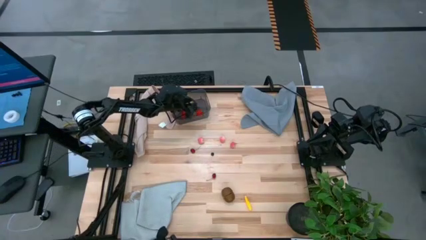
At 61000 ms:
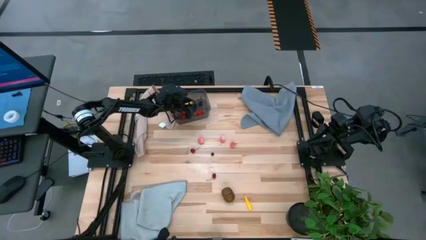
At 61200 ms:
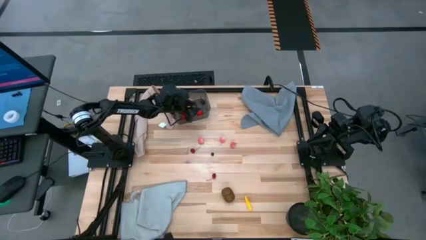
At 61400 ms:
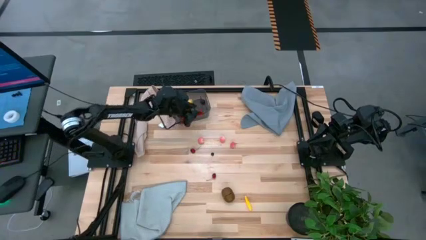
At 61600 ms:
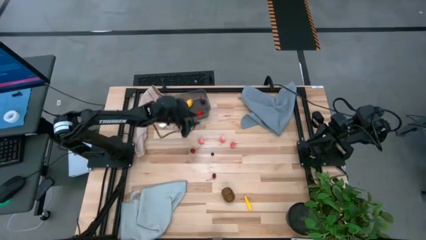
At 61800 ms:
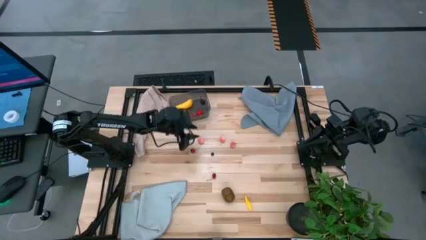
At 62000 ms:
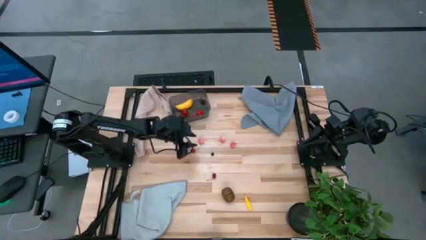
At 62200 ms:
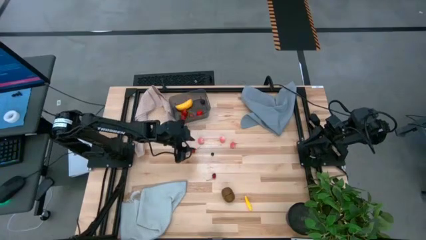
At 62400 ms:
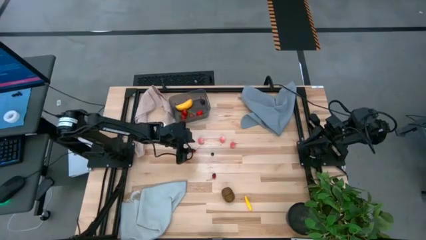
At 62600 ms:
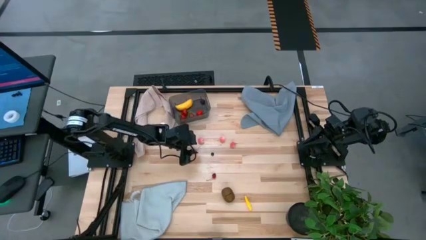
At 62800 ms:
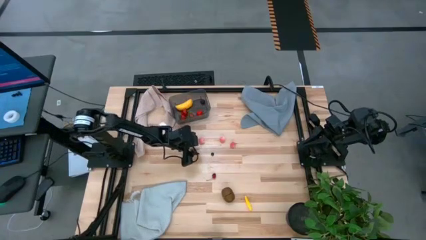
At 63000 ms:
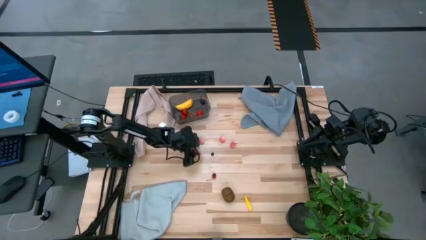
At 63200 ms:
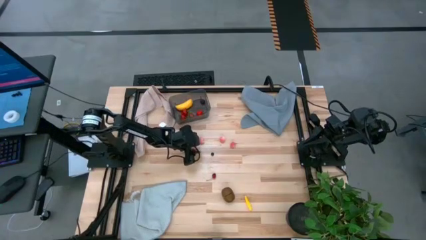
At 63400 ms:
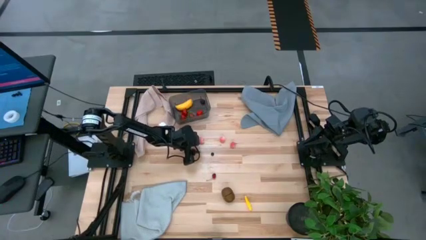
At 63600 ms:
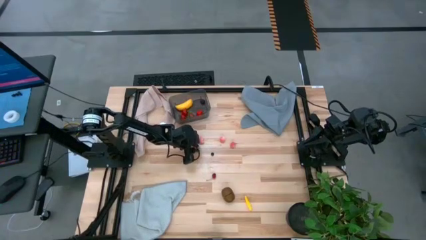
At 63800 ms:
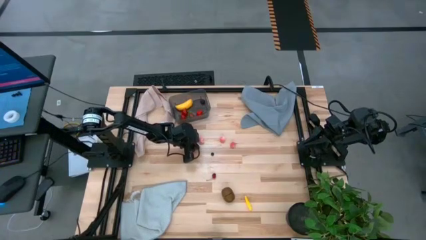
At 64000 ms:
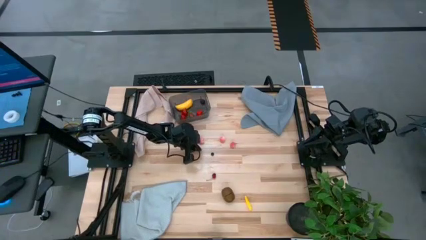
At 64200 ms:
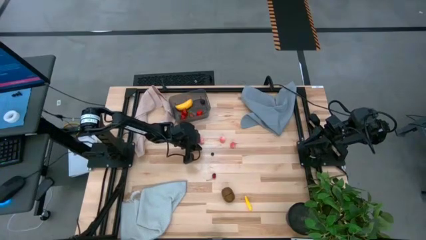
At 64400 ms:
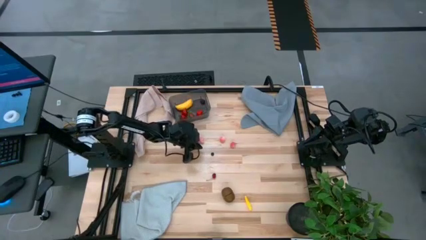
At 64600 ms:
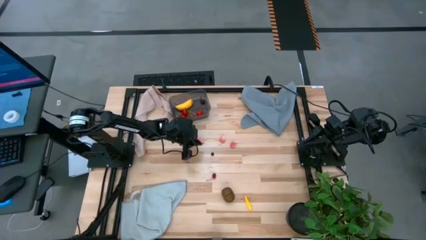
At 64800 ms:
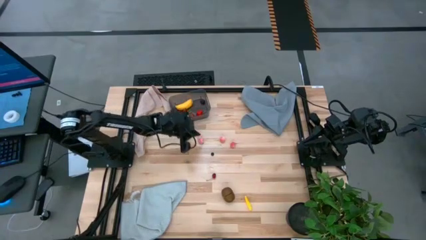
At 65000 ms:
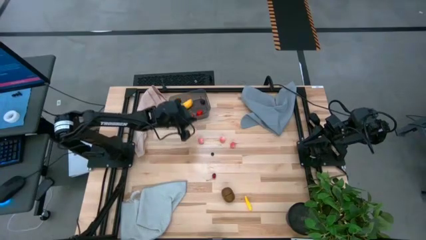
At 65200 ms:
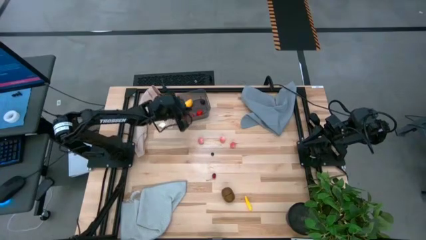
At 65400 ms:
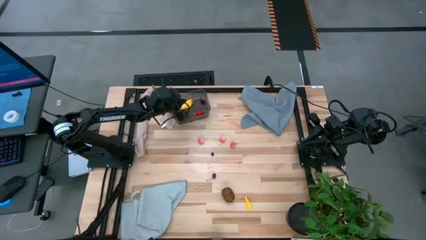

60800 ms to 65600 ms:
Task: Pick and placing Produce into tupperware
Put the red cherry into the black bin

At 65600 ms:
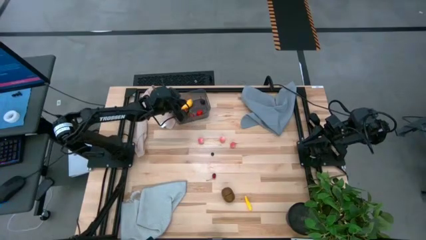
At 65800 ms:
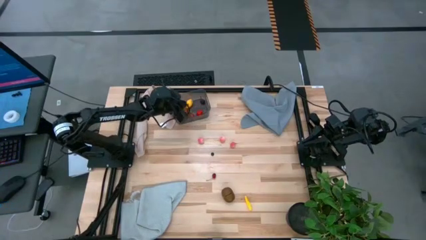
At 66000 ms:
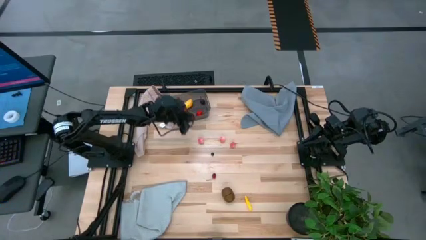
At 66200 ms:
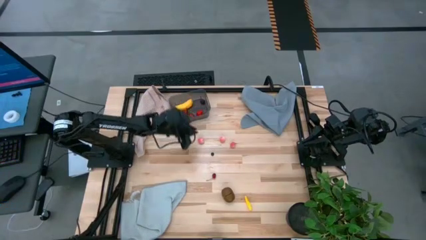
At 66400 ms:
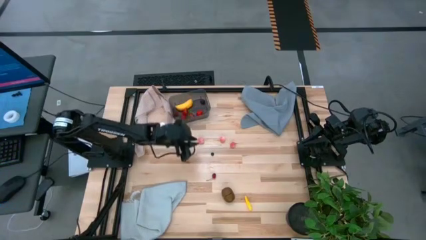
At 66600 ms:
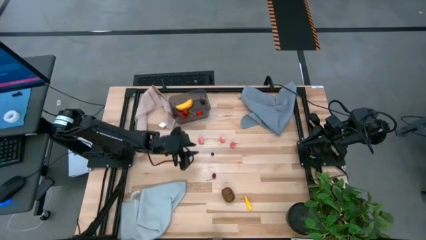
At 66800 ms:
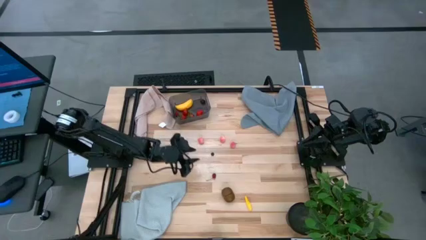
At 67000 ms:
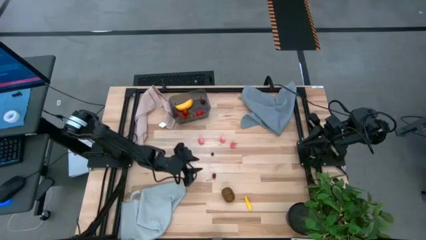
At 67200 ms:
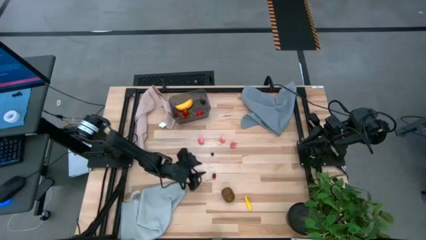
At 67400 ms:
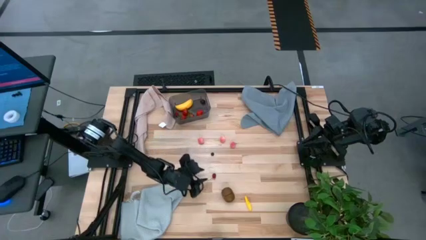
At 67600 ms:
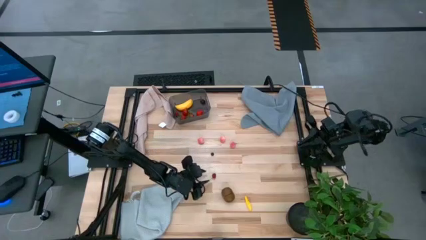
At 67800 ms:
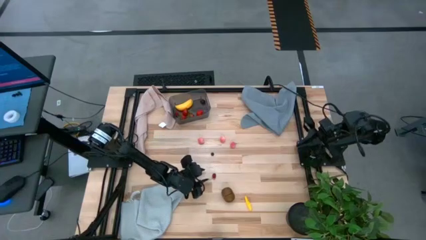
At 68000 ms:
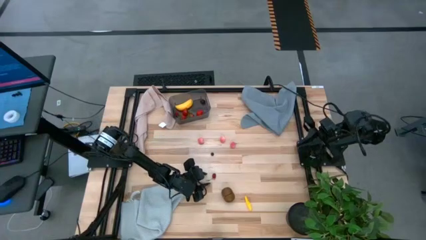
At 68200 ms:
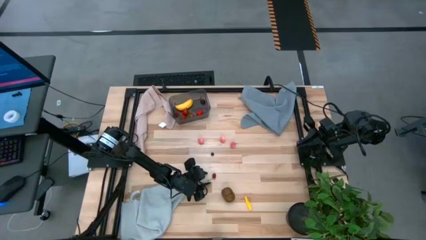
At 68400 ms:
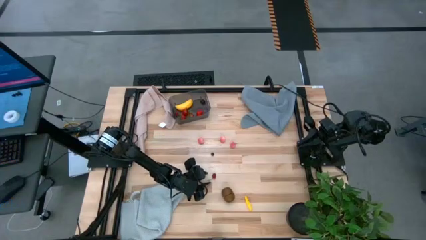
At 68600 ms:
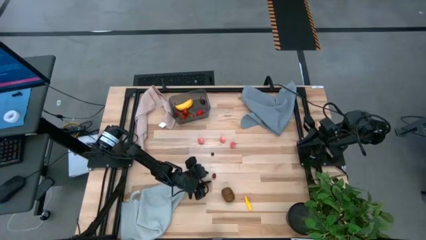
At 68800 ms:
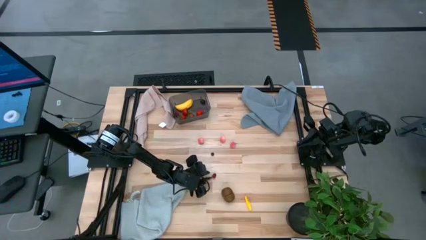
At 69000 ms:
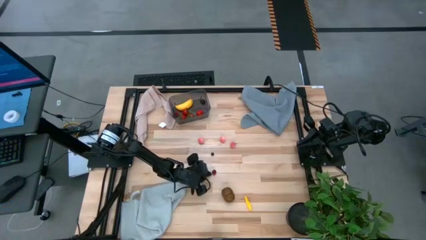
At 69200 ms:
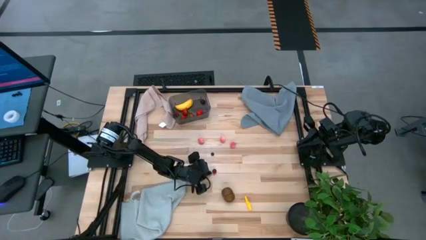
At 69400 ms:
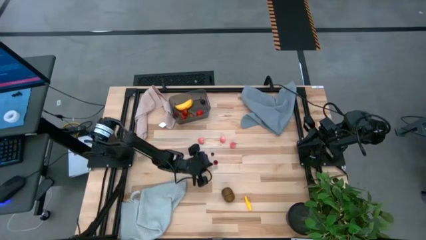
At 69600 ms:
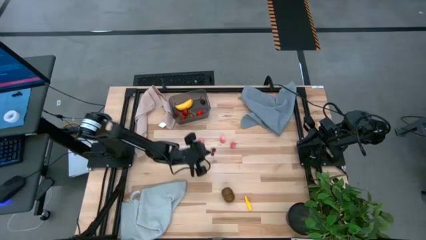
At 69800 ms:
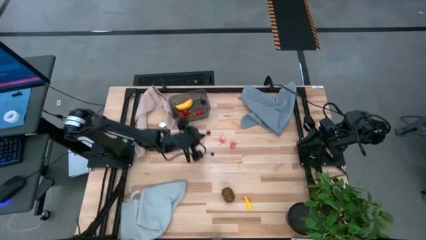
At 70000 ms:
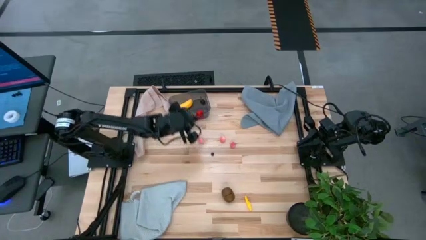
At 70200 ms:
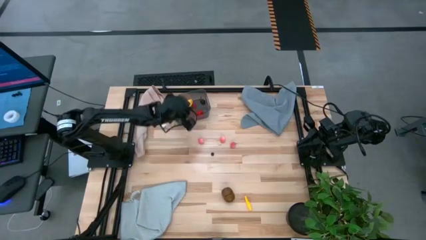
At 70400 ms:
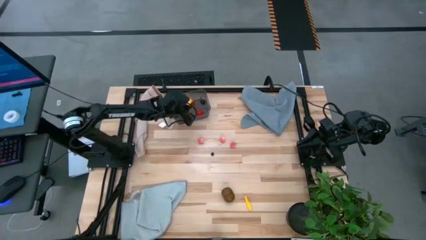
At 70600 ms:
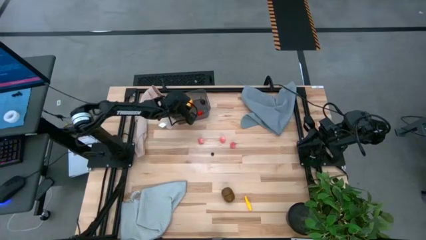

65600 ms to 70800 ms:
Put the red cherry into the black bin

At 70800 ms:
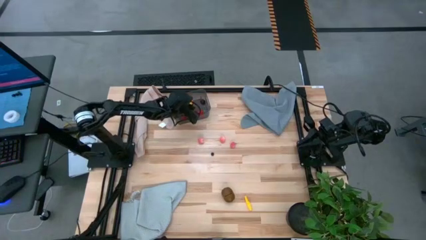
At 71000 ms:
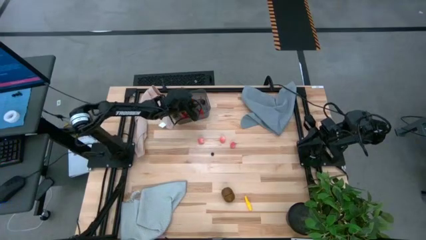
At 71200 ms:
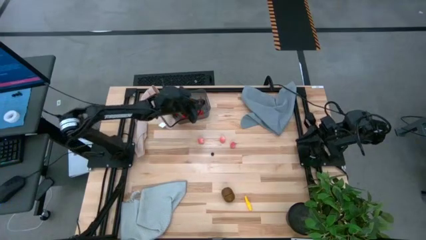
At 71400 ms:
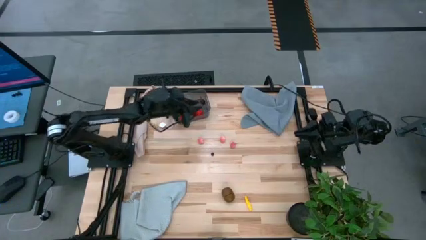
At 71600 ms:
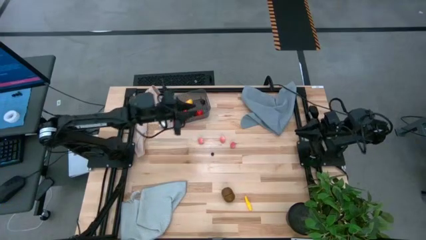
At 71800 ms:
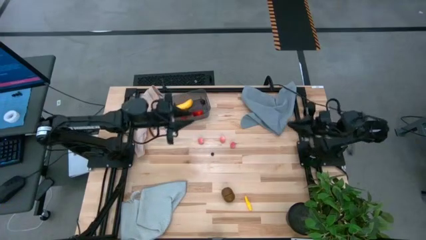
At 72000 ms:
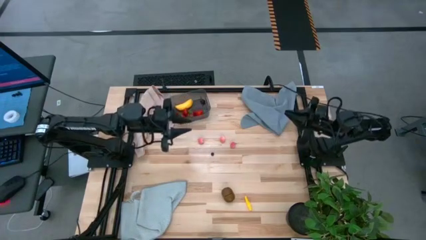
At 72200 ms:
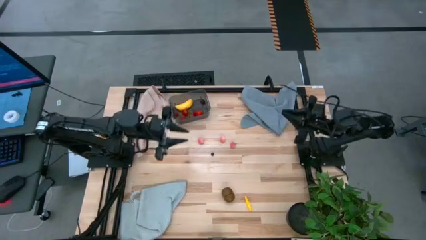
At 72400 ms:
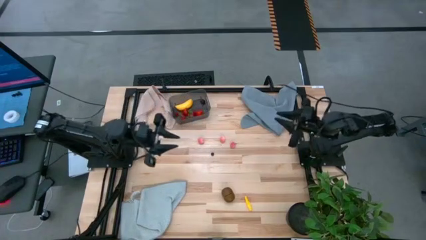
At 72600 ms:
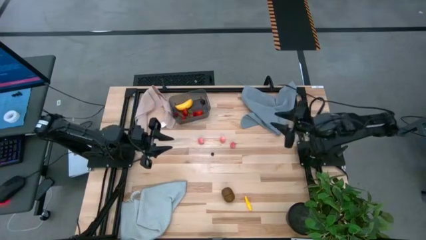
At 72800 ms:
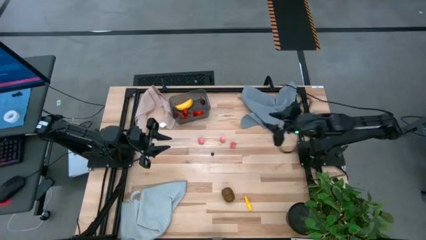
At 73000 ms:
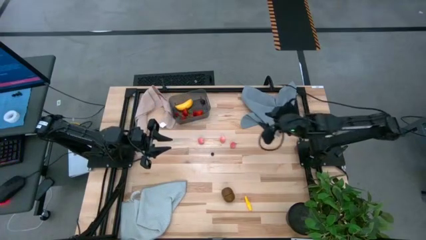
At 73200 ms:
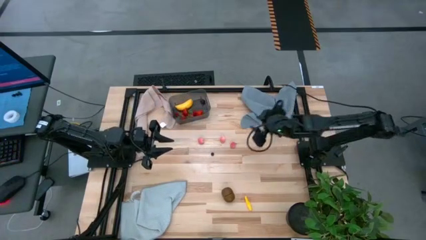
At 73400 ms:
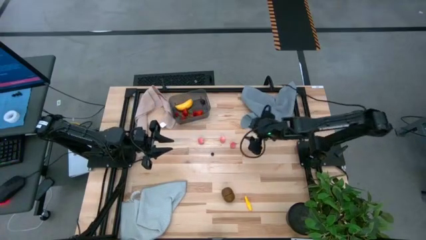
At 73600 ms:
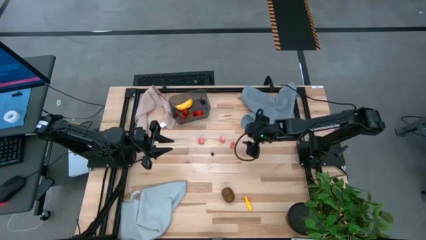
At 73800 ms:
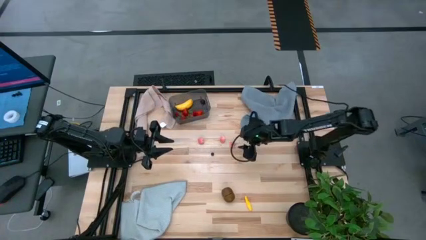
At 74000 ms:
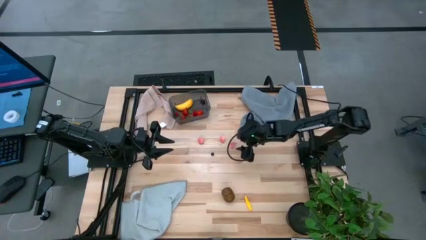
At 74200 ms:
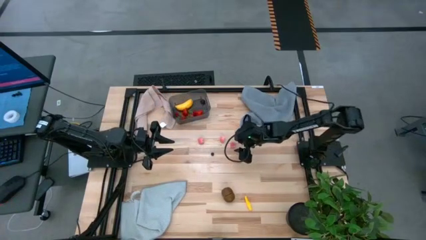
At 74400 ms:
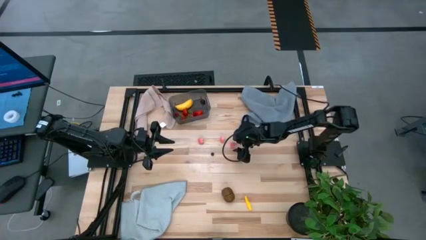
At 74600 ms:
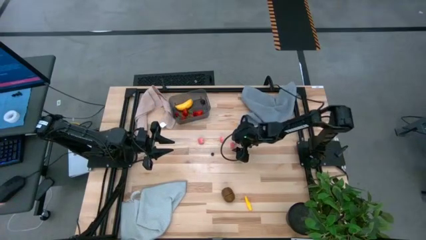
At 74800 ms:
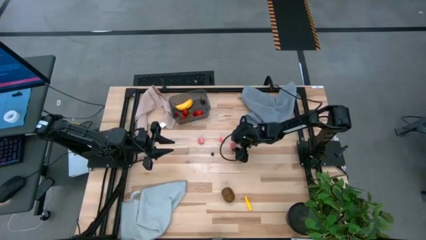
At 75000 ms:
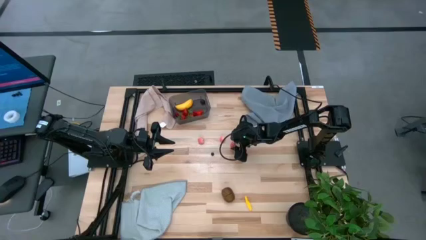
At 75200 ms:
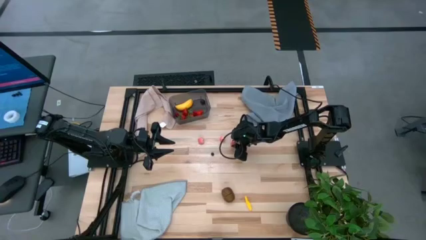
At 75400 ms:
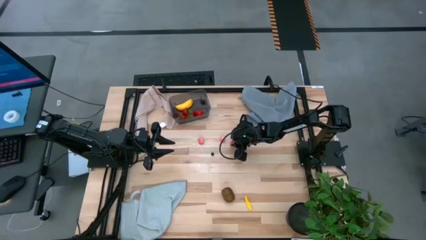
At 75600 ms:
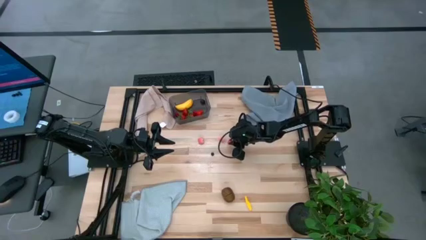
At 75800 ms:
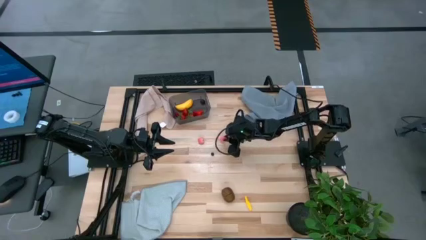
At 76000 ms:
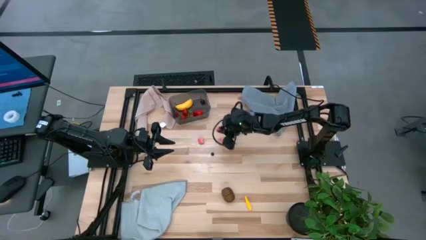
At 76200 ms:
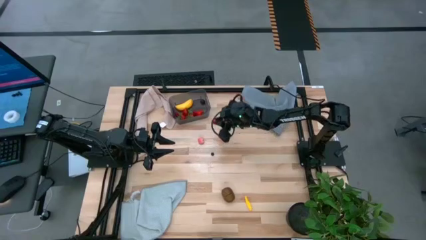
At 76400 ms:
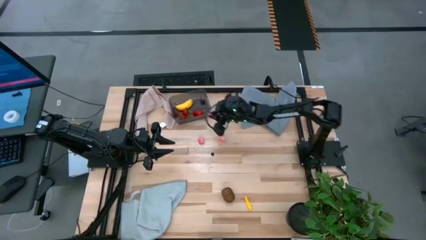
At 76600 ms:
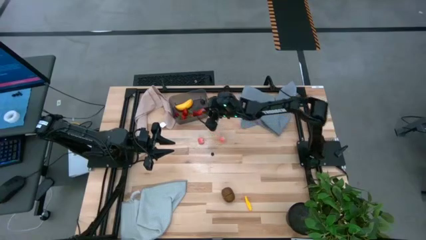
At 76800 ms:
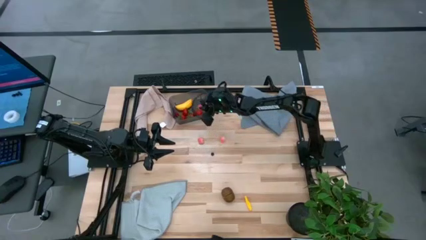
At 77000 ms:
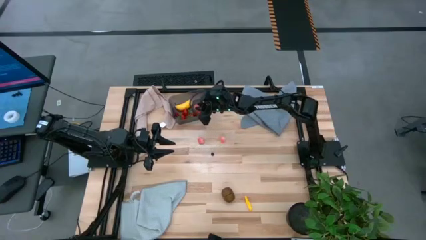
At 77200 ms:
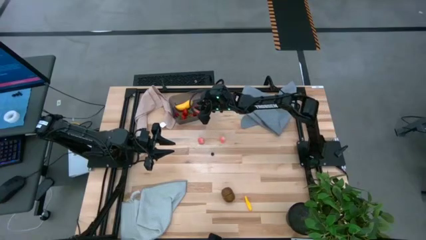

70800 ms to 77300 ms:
Put the pink peach into the black bin
